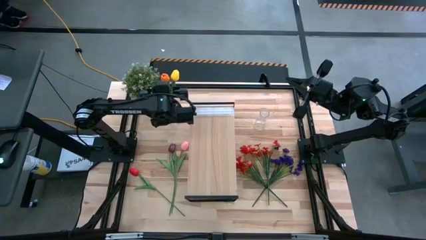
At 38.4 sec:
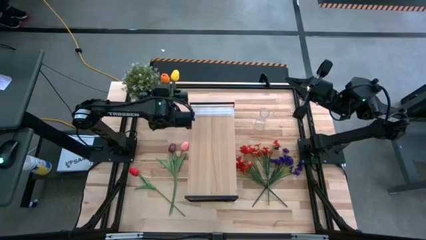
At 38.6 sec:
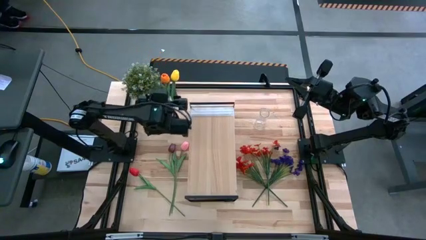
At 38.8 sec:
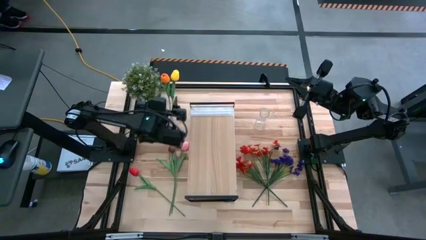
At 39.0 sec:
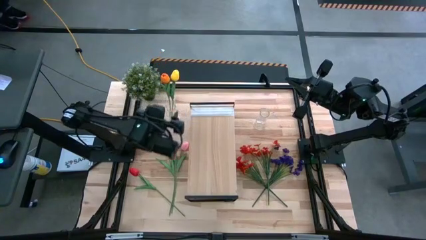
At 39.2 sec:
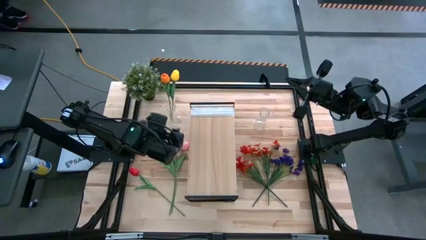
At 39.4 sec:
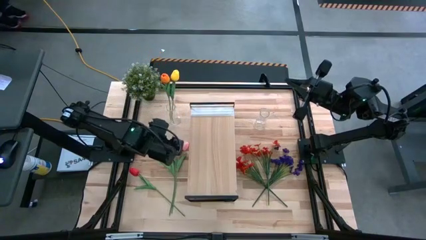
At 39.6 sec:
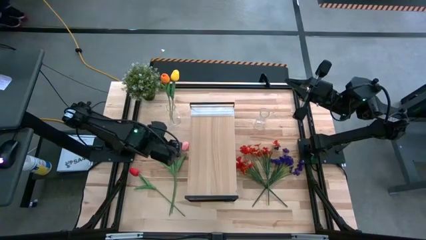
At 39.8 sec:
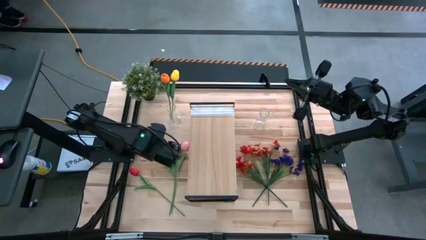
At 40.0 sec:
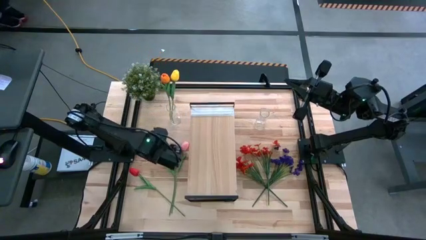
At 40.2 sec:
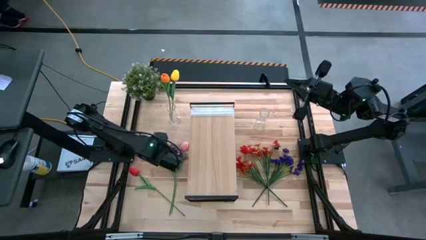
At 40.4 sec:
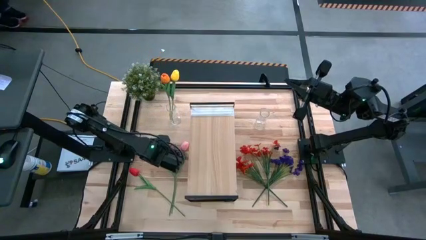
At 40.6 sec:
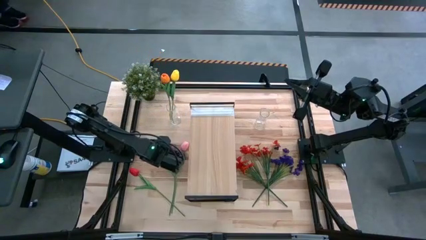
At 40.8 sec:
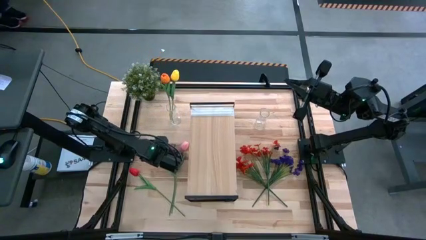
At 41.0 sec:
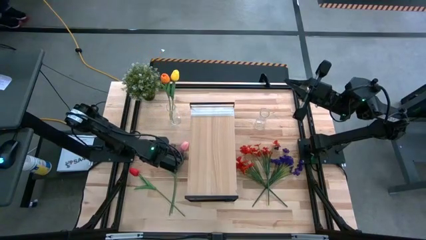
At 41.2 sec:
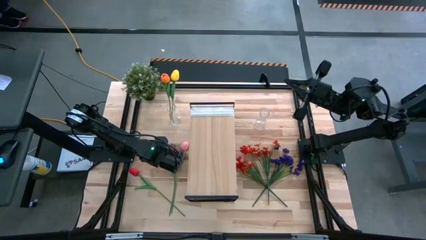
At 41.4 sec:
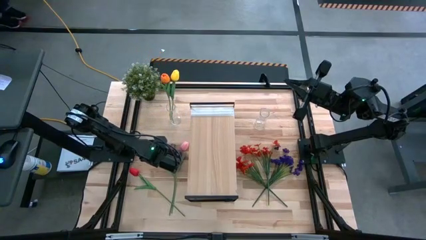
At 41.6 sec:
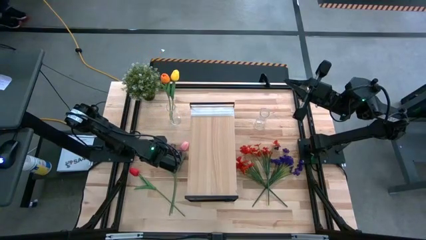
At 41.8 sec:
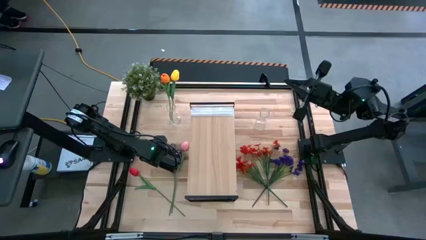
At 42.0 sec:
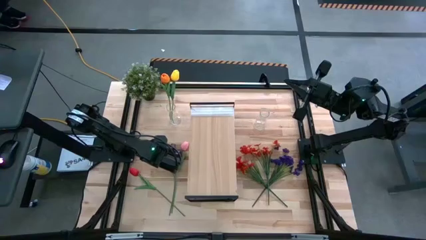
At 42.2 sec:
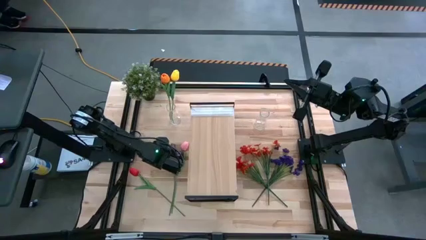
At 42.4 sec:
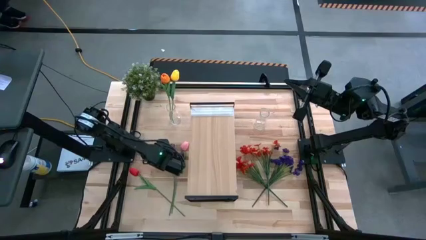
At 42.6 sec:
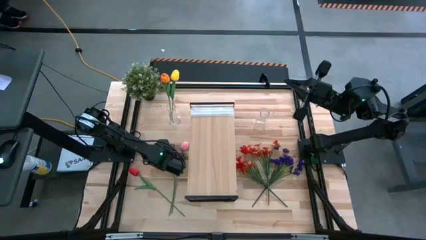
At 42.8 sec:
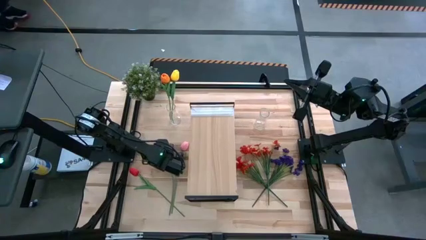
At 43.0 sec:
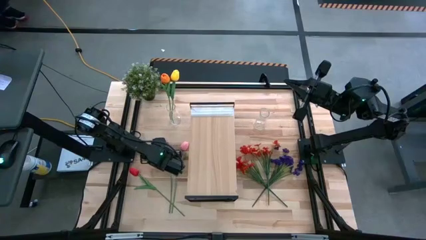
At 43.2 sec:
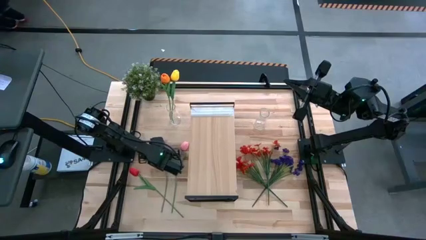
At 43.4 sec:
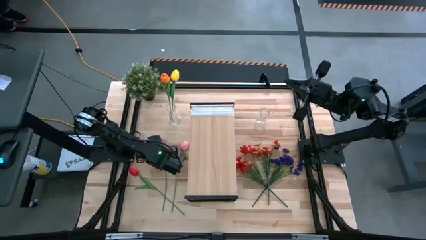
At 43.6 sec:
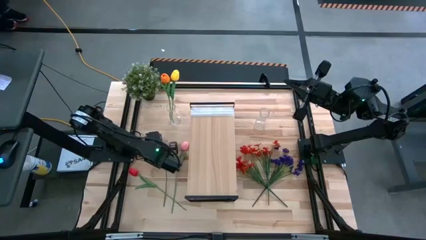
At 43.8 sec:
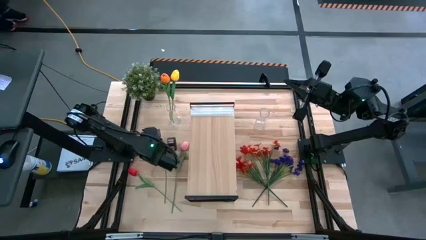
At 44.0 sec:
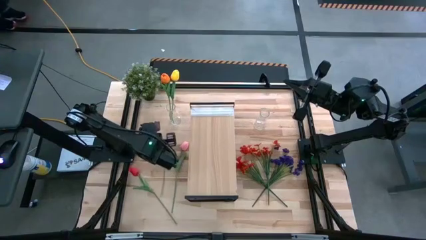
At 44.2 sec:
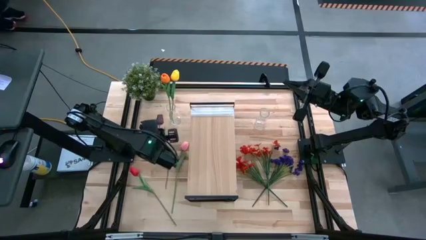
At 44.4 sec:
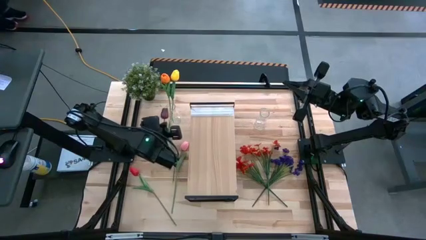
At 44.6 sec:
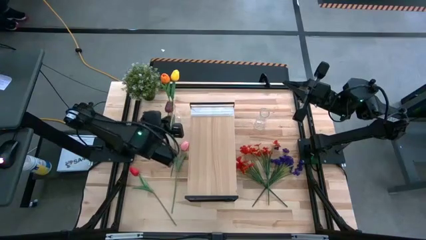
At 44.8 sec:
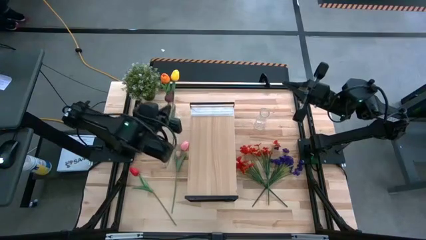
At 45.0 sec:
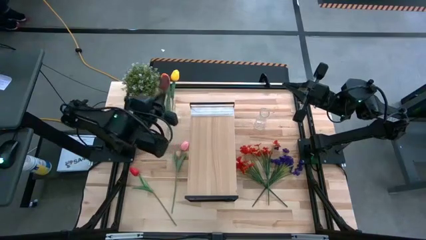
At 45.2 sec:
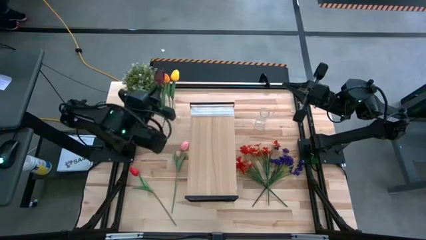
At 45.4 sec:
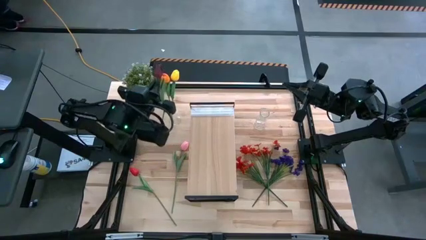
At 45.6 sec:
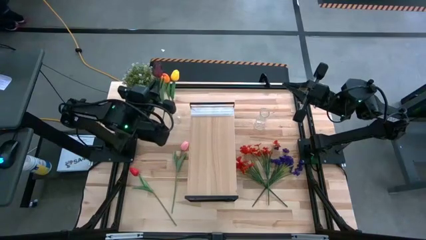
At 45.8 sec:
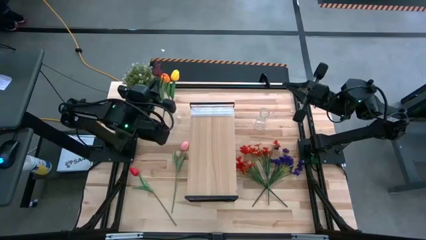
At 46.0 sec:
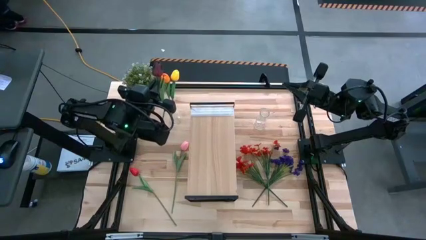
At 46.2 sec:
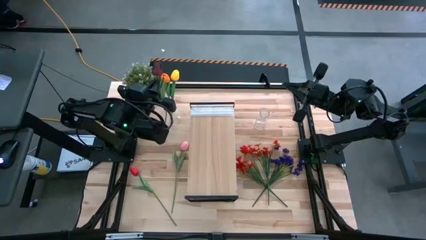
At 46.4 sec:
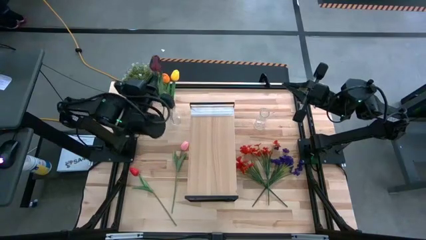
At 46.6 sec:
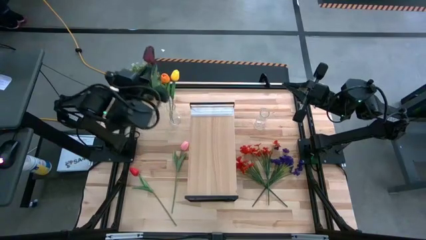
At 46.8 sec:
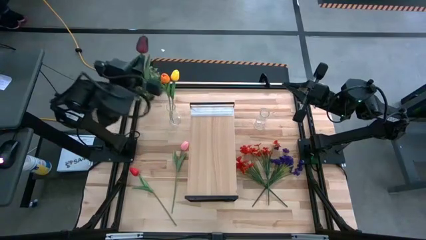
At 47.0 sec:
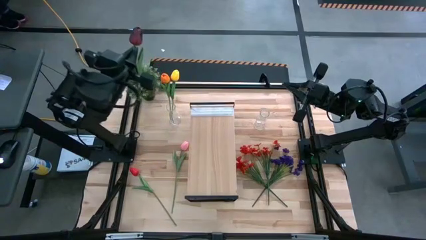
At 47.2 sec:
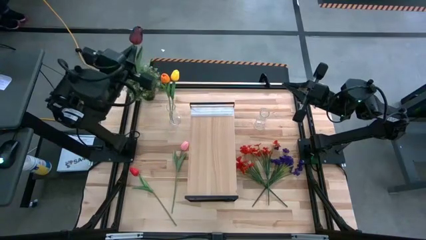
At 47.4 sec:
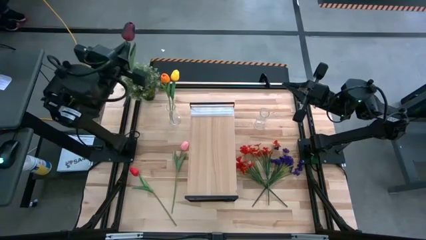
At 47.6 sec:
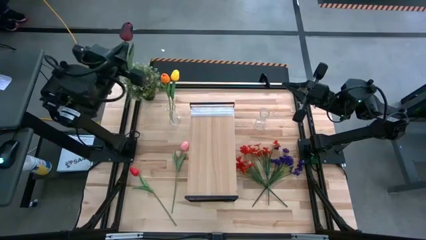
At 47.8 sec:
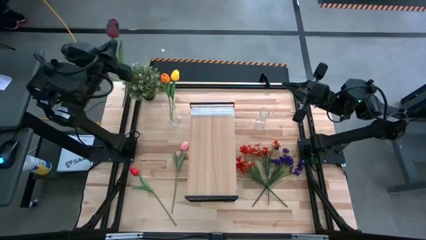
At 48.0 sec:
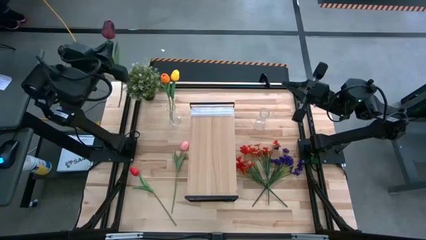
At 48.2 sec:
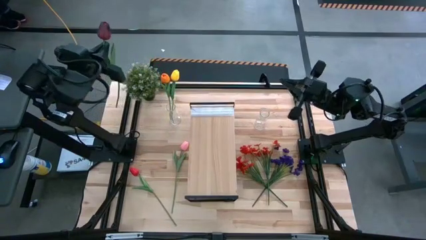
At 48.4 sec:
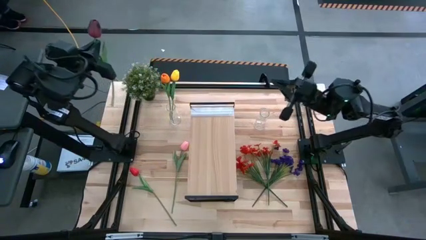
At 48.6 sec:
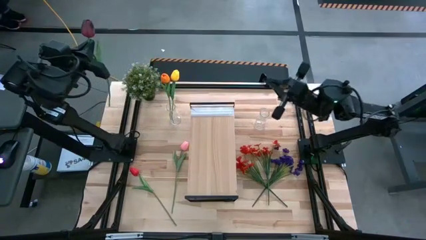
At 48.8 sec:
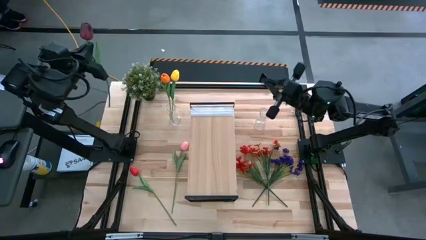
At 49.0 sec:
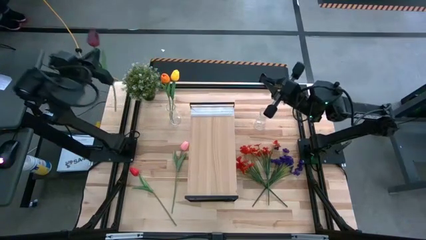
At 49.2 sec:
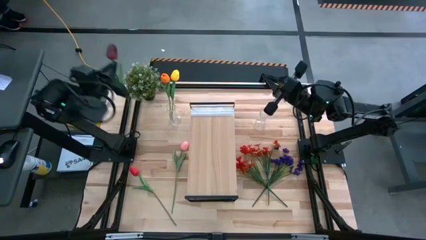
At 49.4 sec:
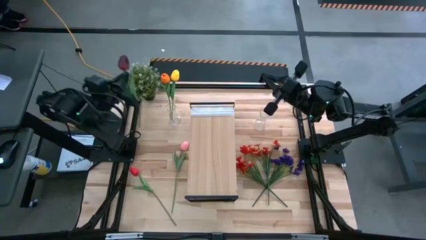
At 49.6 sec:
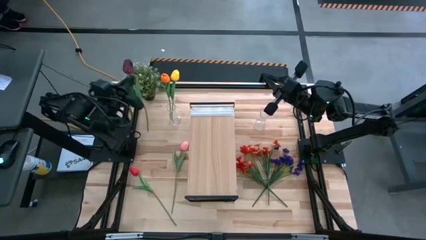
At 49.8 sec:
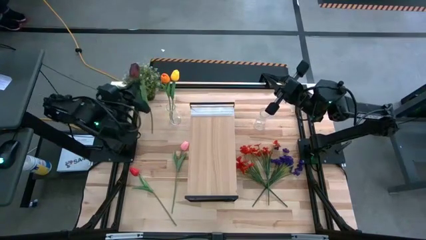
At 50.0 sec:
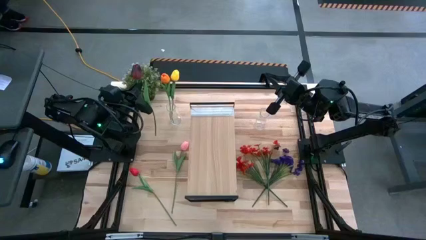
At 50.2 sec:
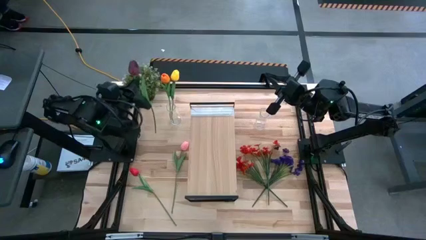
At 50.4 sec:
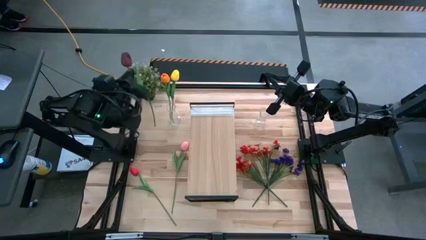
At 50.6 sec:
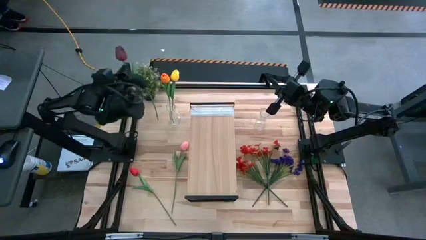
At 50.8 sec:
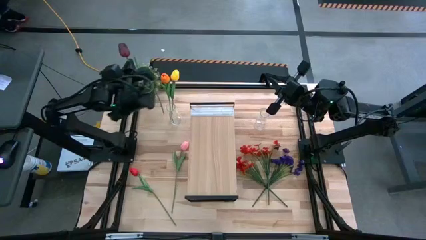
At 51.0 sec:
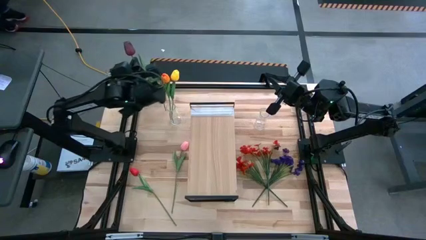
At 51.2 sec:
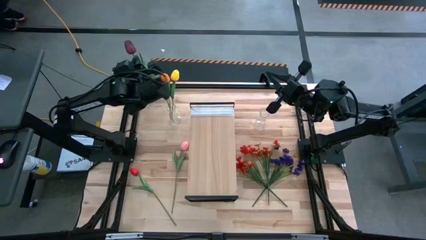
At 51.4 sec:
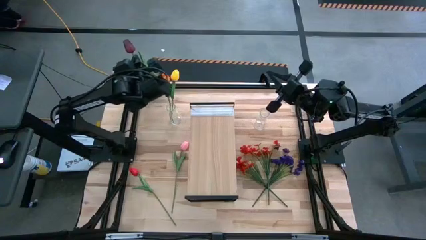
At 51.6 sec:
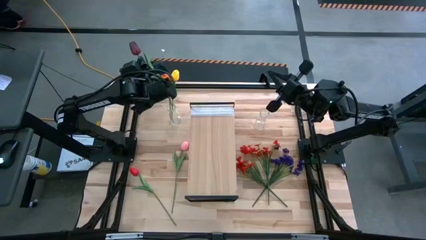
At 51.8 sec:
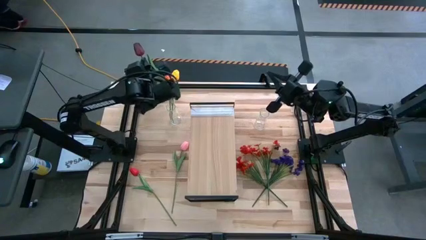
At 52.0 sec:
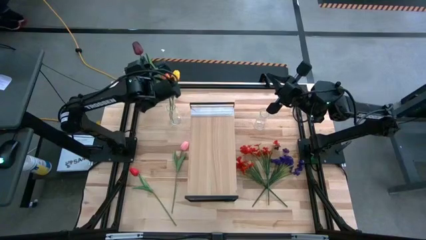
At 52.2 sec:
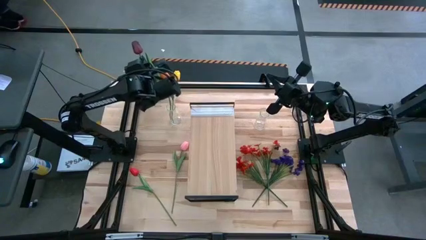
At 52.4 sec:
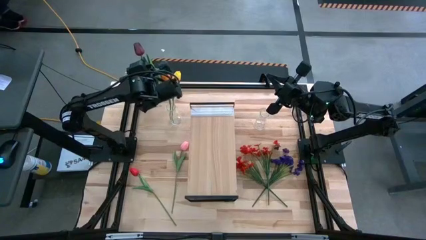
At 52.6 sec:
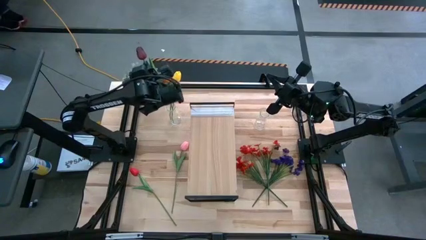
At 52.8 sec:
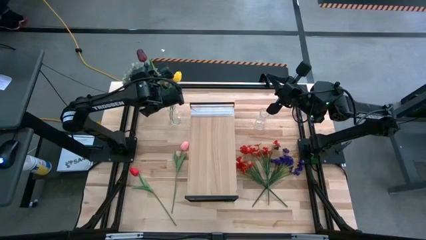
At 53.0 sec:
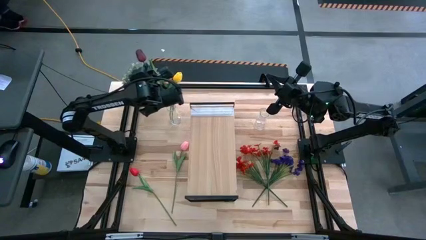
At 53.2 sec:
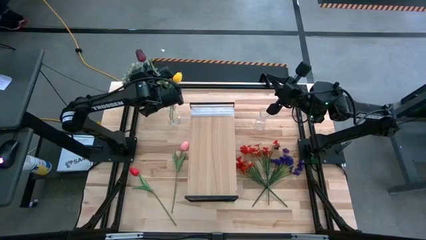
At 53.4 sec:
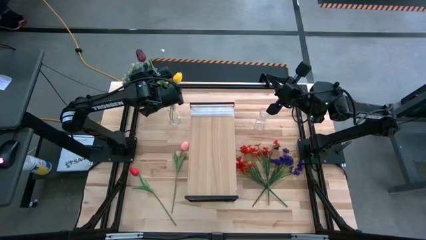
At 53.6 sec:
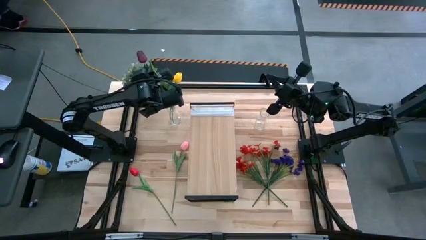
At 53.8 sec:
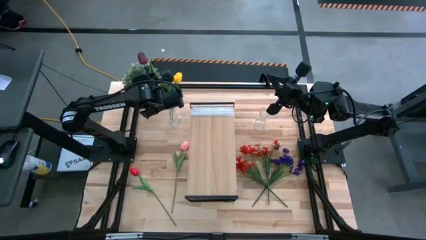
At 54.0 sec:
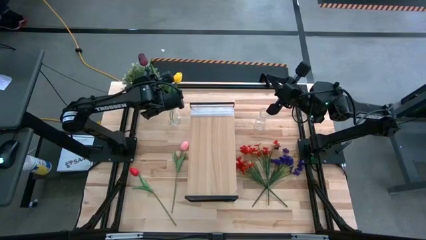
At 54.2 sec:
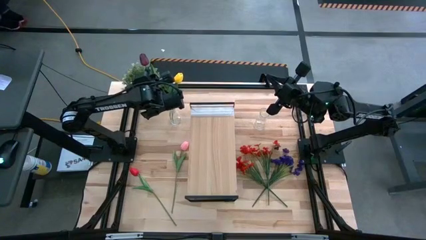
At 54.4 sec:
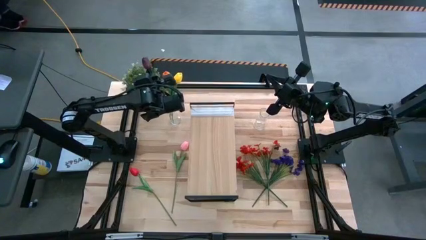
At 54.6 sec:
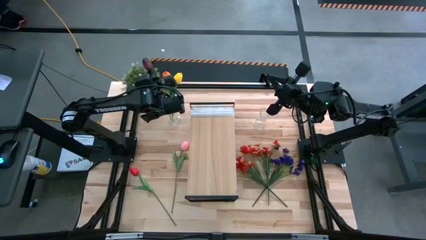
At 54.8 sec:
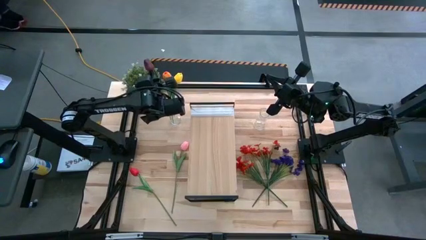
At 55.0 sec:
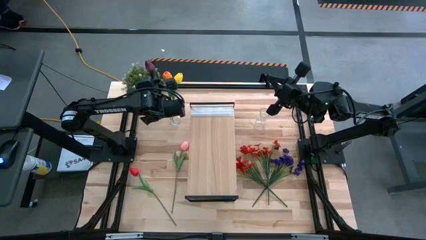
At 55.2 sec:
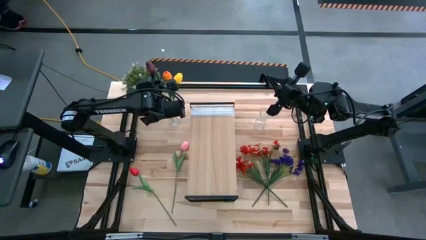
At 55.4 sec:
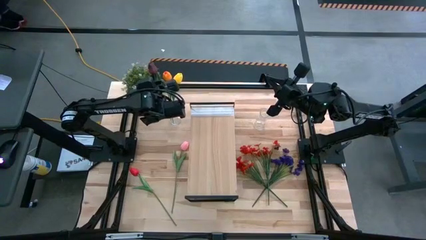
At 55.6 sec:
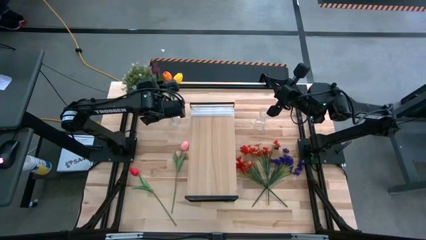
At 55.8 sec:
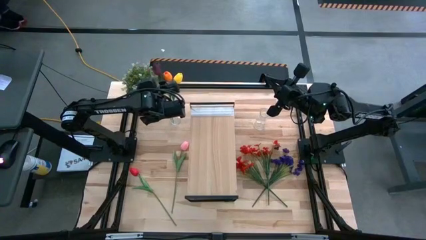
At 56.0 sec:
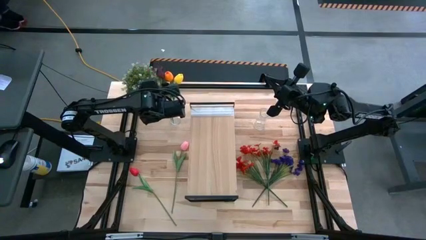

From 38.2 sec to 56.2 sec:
Task: Pick and place flowers into a vace then onto a shelf
Put the dark red tulip into the left transparent vase
